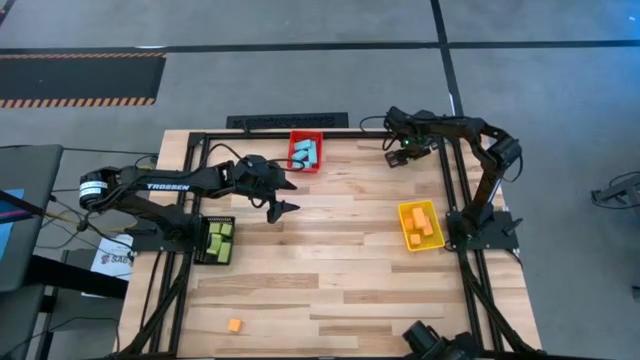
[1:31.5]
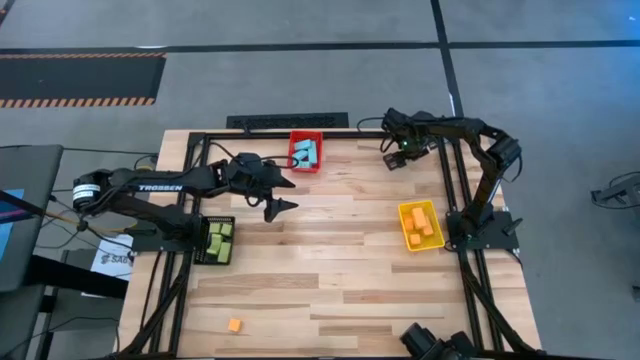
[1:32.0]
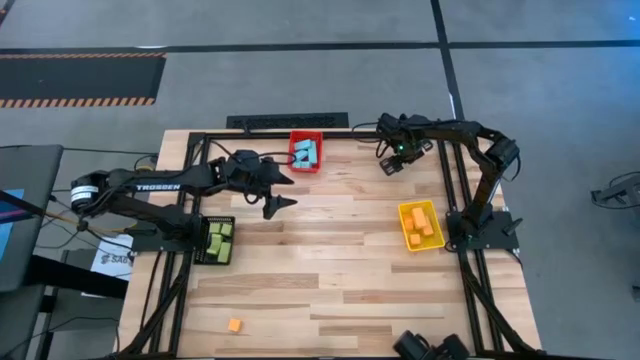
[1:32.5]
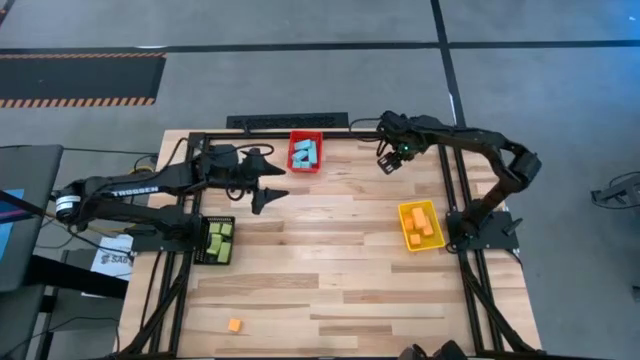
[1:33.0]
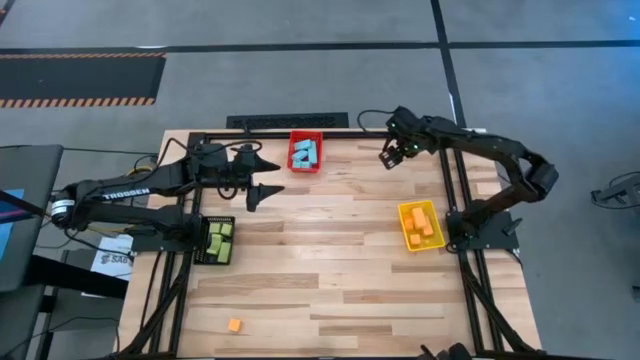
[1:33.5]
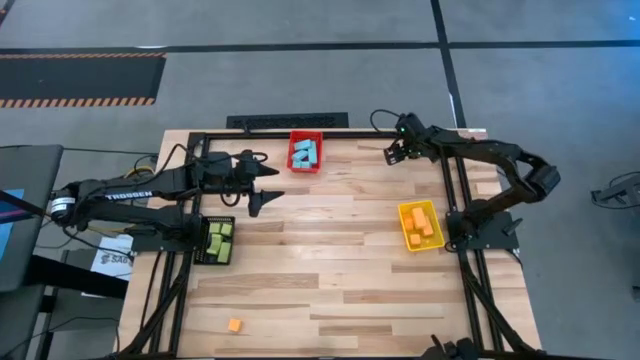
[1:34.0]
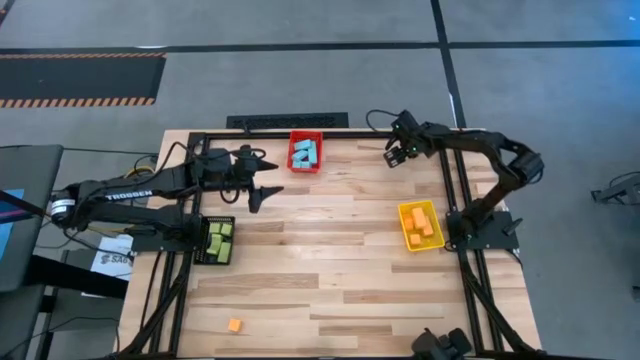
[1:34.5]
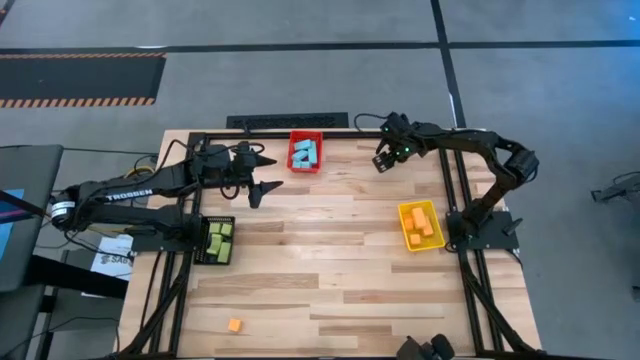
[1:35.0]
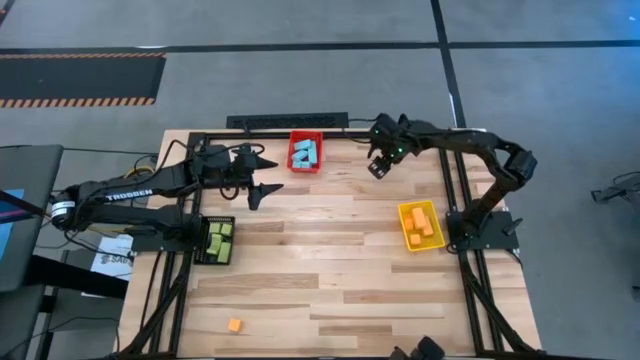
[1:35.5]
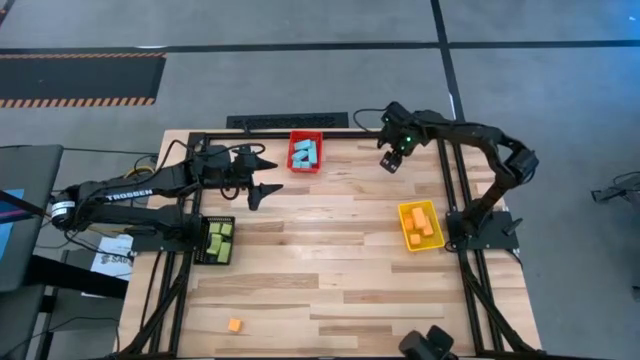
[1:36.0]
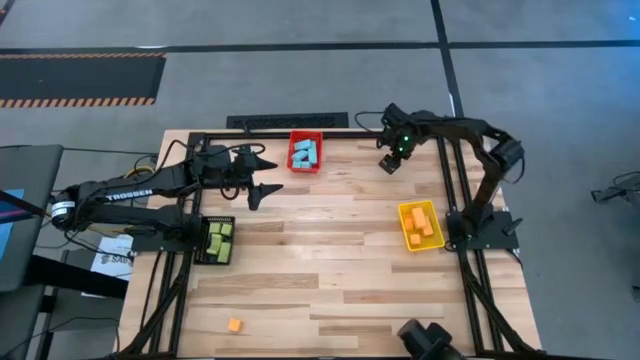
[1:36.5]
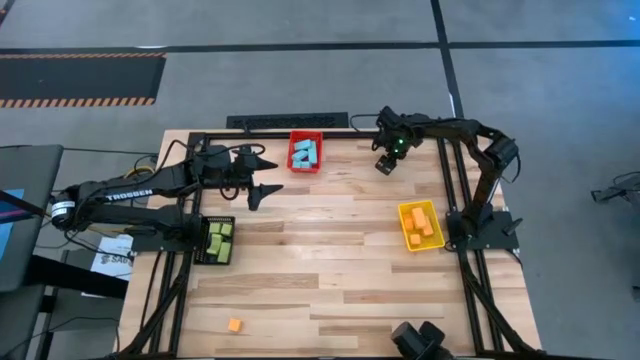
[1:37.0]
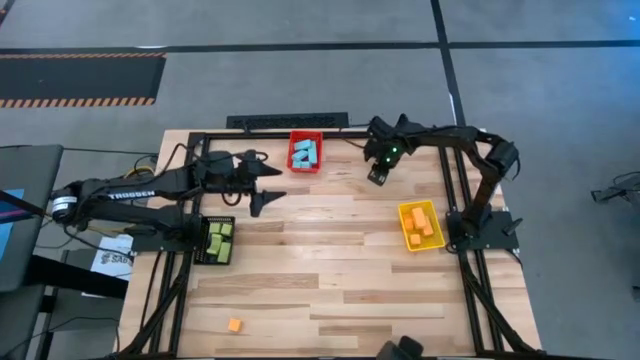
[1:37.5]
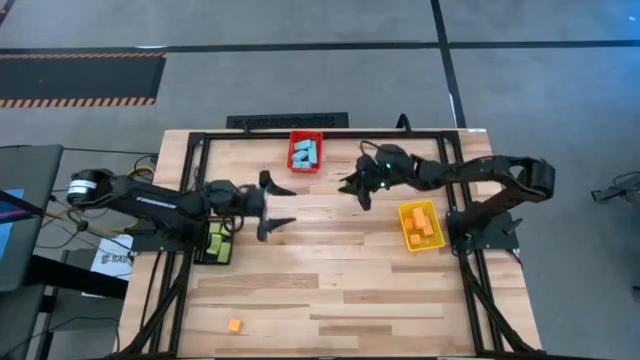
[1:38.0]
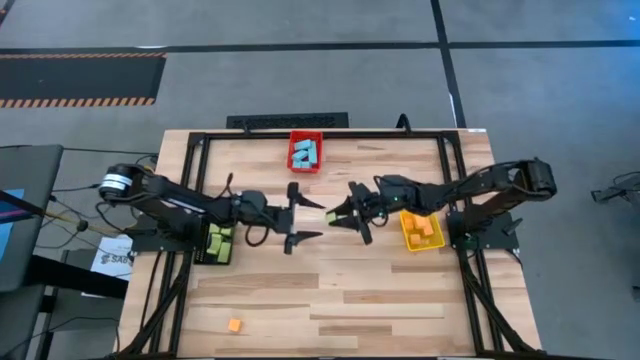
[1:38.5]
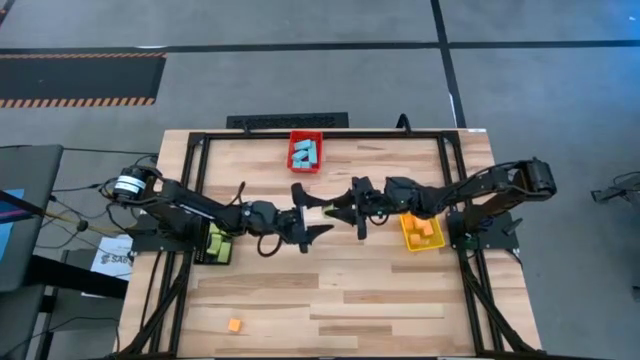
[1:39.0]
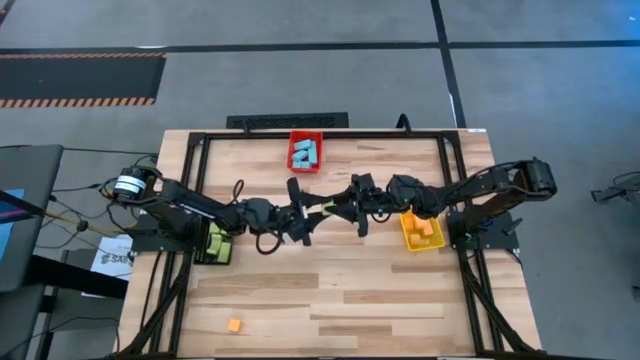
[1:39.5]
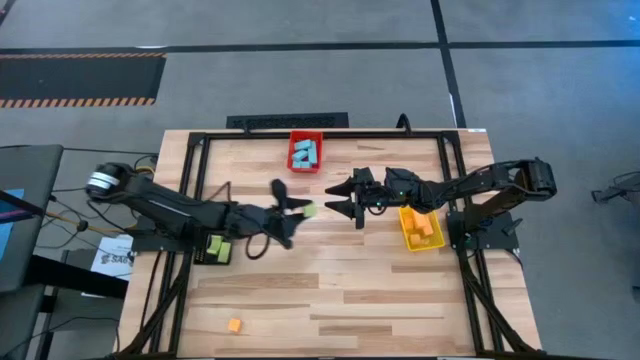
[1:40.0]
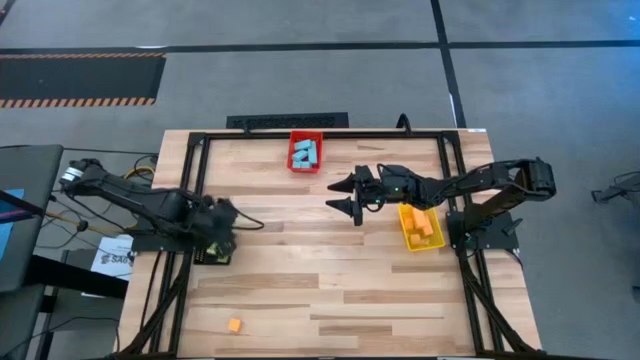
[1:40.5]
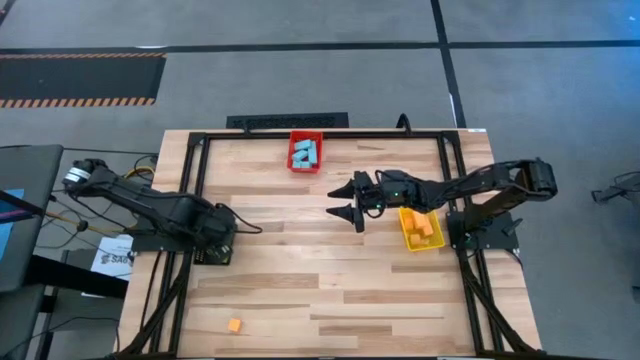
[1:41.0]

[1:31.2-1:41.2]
Task: Sort & place blocks by color
Put the light green block into the black bin

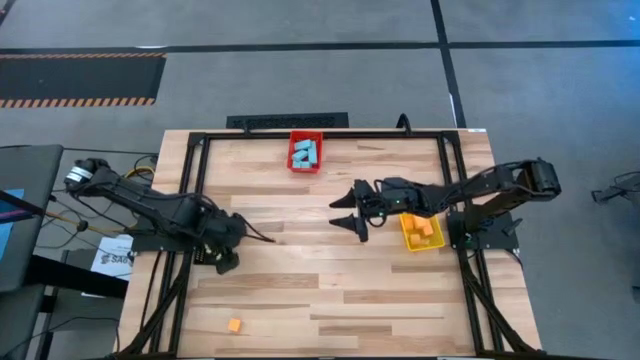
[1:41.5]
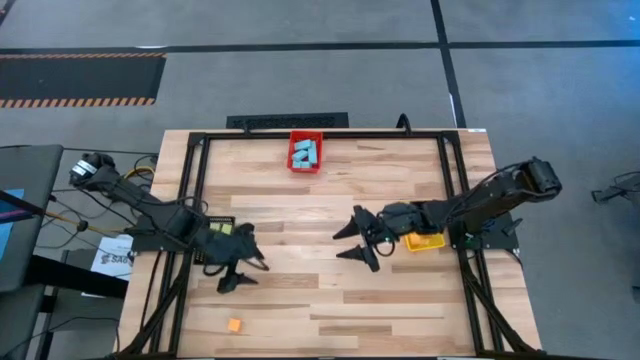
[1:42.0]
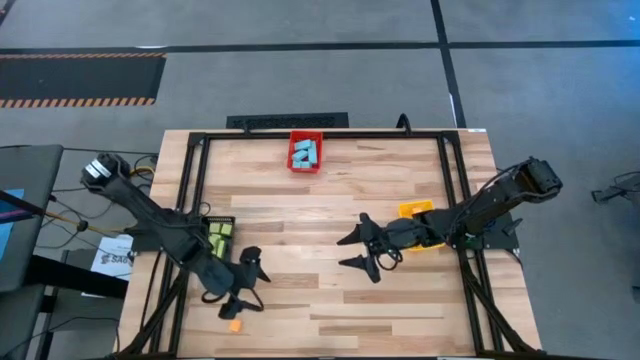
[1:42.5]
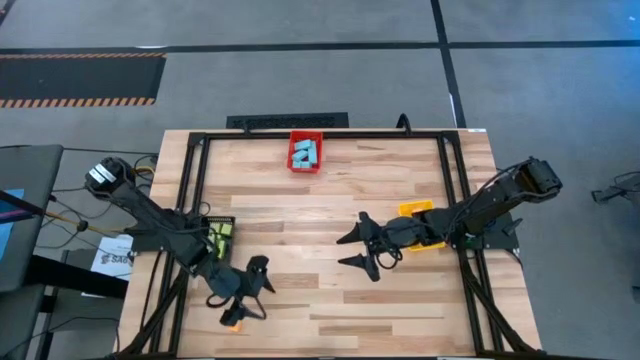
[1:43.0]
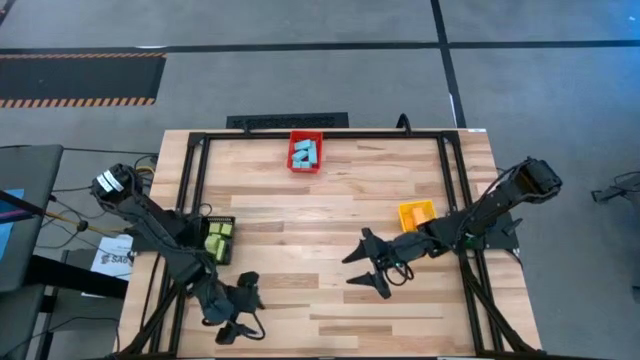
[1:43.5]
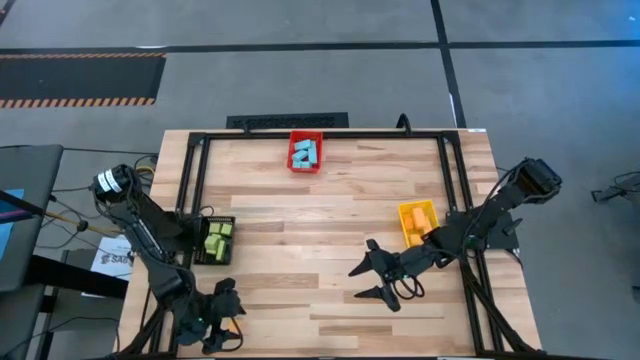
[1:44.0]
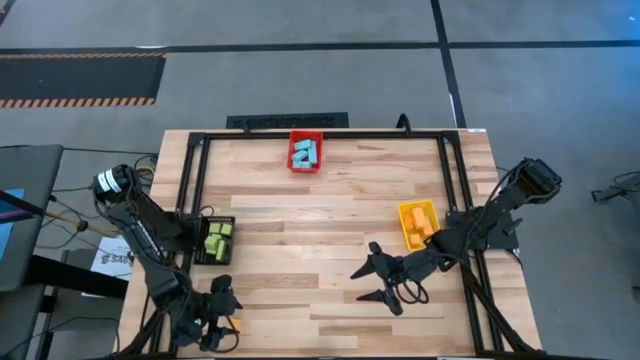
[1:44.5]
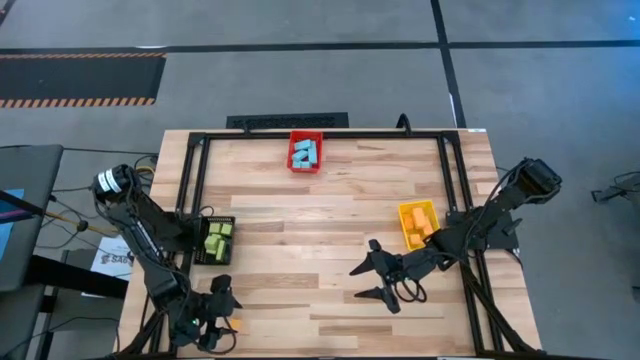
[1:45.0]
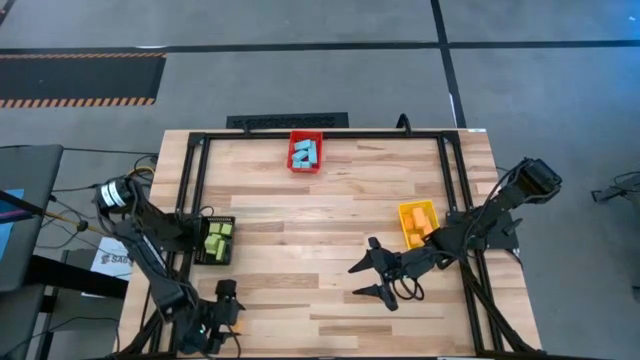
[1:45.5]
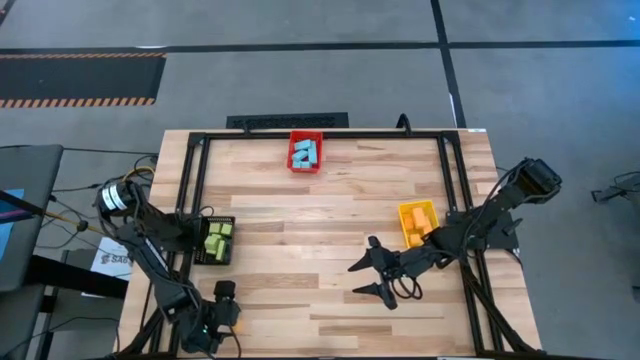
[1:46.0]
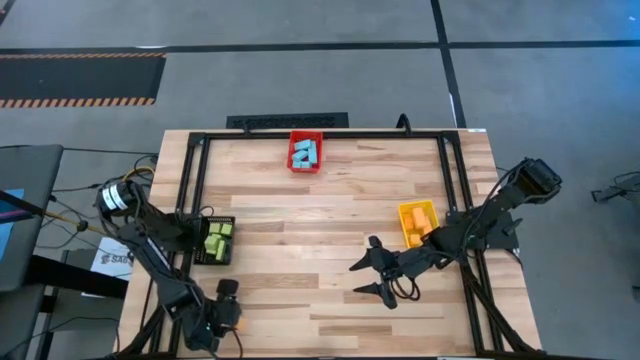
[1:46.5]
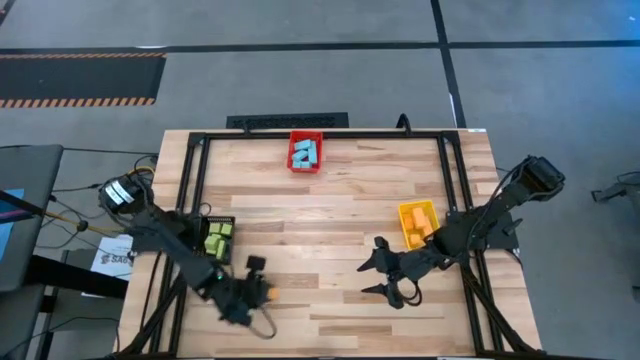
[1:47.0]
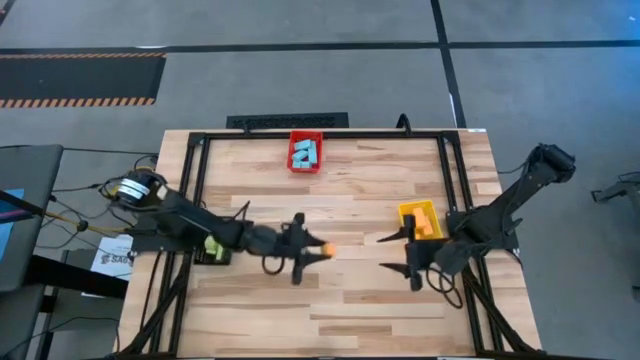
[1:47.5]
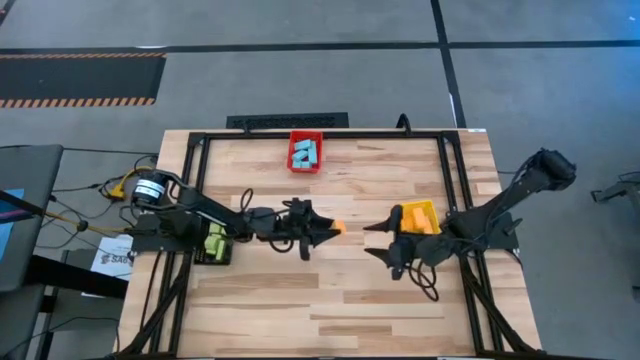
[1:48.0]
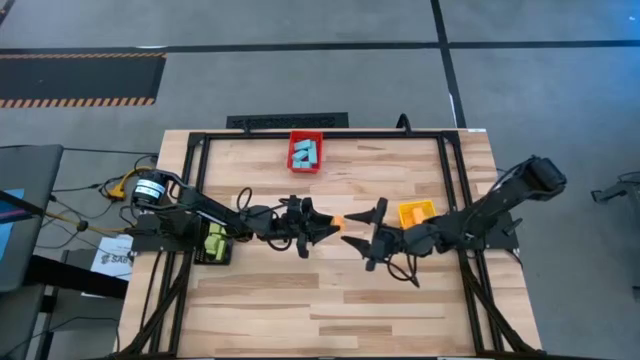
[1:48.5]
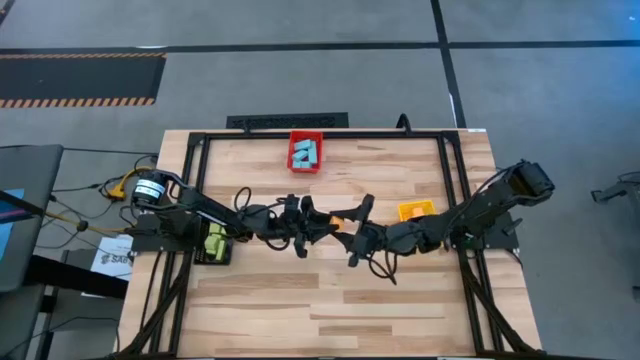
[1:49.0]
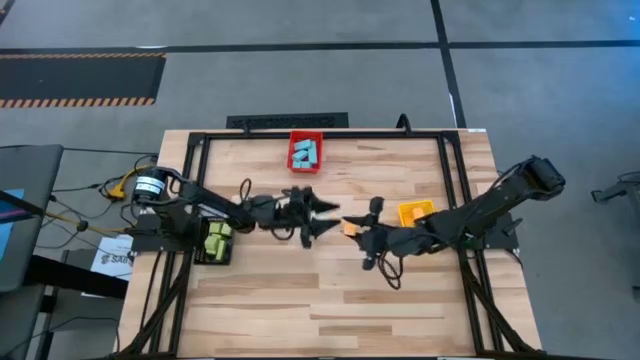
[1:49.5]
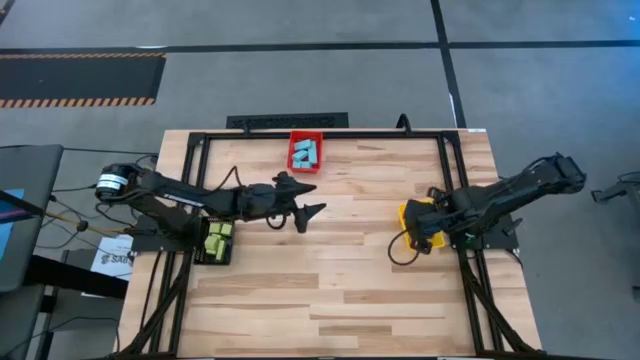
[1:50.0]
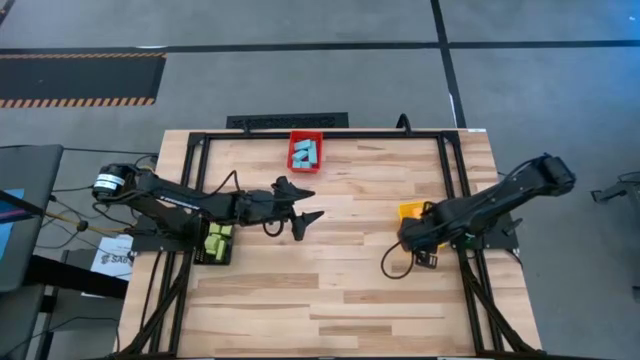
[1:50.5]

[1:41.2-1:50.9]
Put the yellow block into the yellow bin

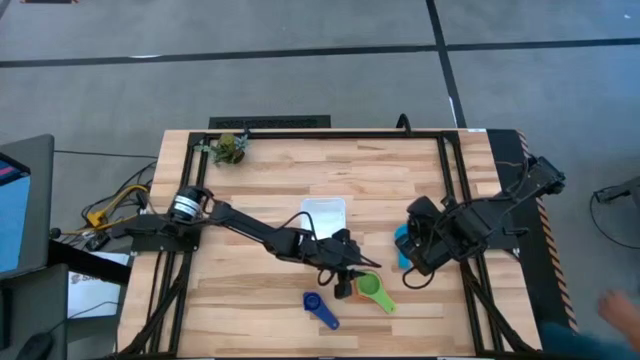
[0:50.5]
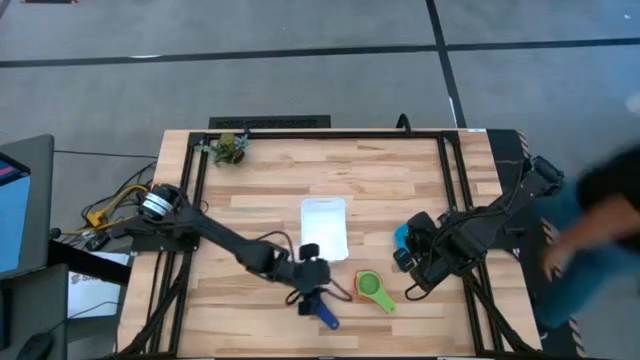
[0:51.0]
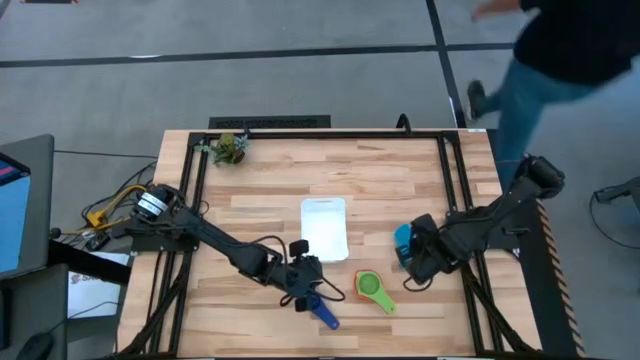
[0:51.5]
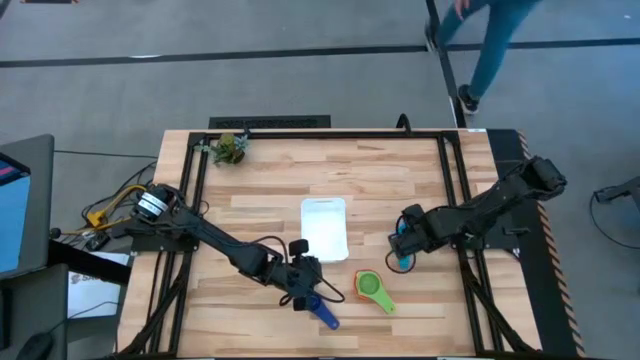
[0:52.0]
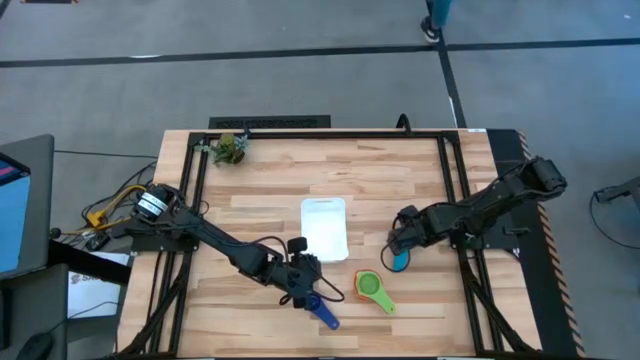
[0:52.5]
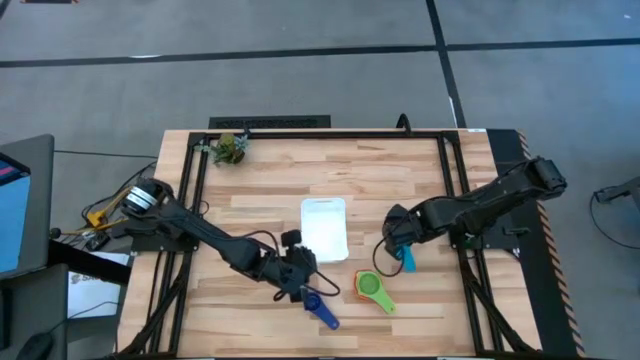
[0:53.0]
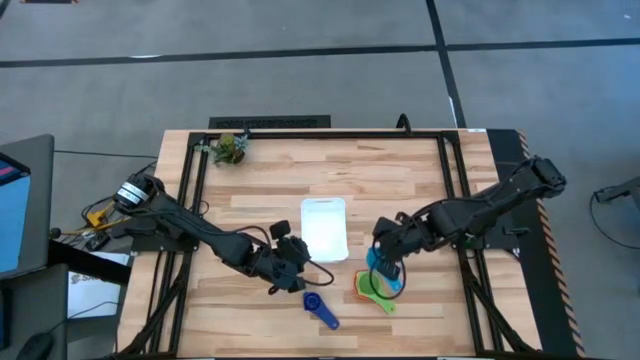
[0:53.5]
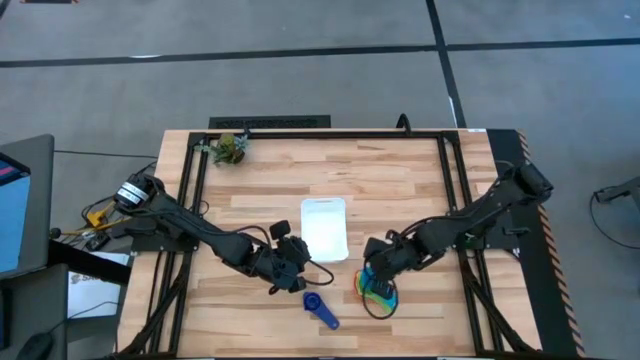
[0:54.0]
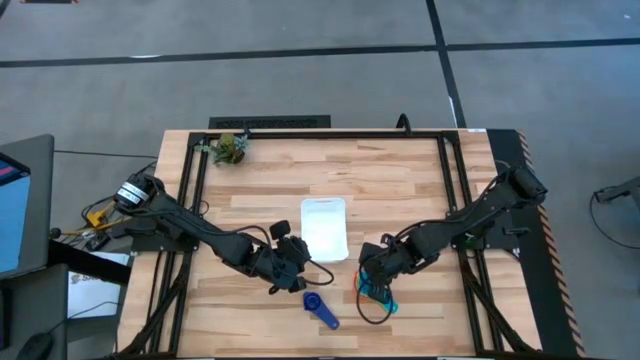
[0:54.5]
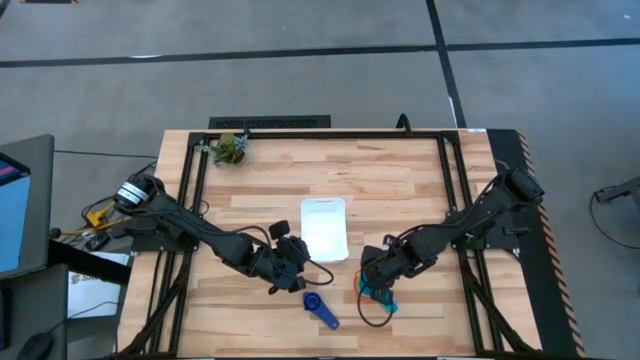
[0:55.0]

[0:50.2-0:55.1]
Task: Nest measuring cups in basket
Stack the light blue measuring cup on top of the green measuring cup
